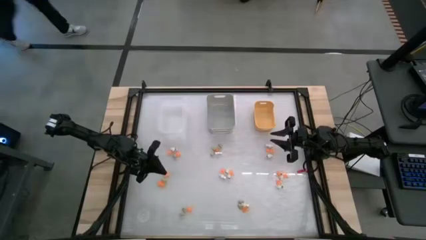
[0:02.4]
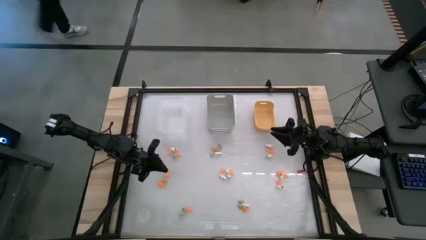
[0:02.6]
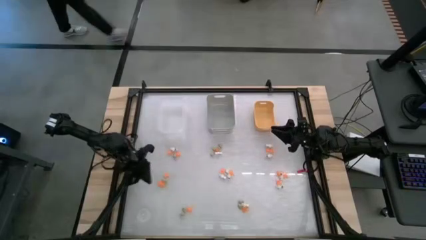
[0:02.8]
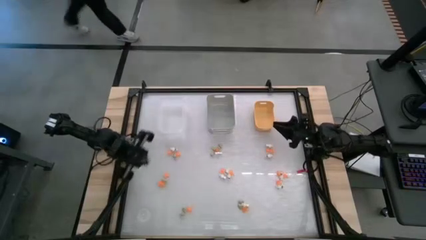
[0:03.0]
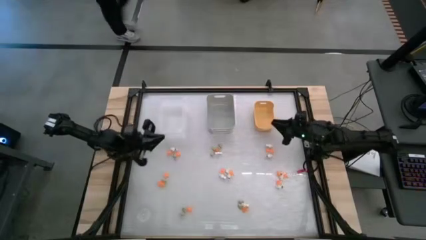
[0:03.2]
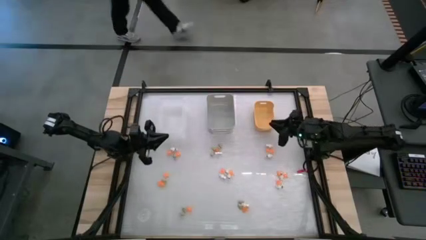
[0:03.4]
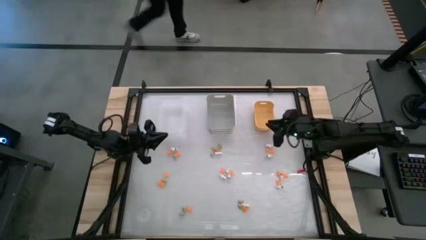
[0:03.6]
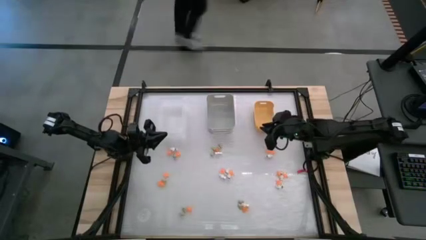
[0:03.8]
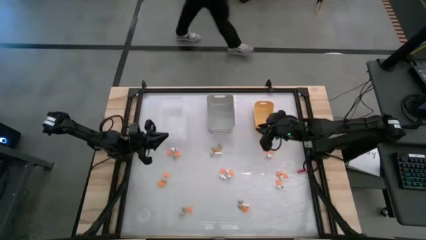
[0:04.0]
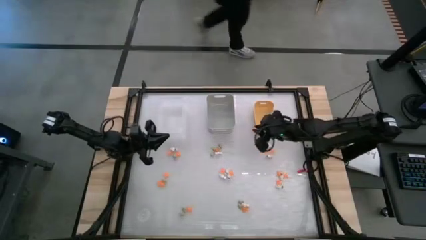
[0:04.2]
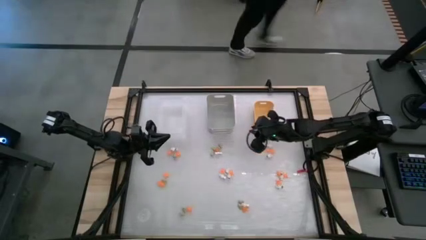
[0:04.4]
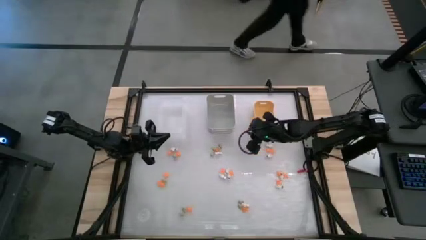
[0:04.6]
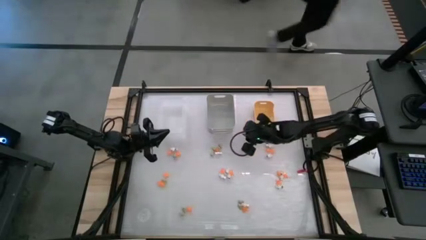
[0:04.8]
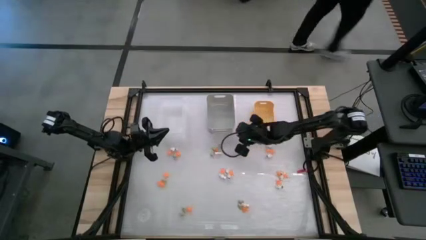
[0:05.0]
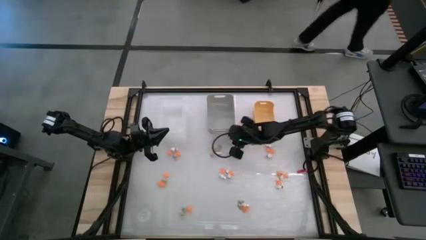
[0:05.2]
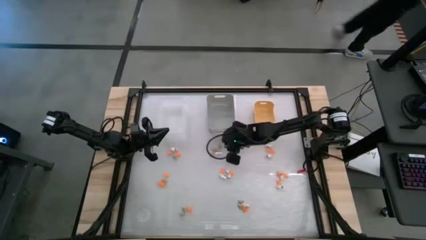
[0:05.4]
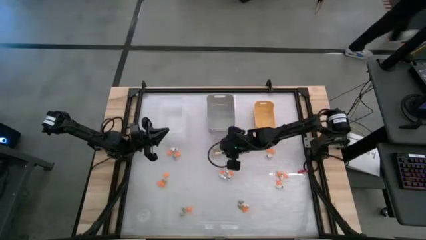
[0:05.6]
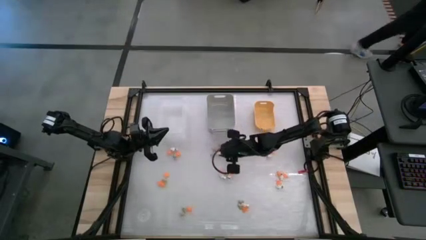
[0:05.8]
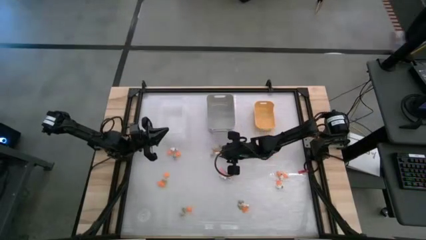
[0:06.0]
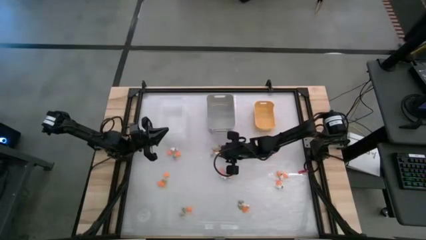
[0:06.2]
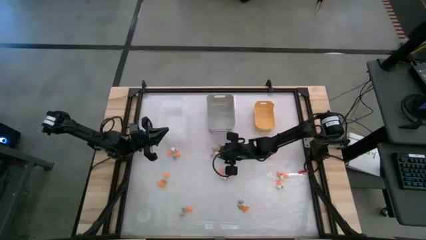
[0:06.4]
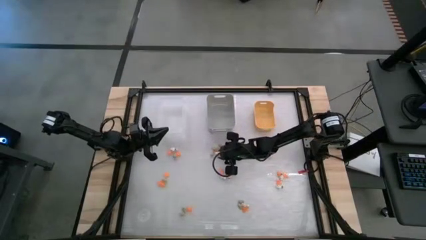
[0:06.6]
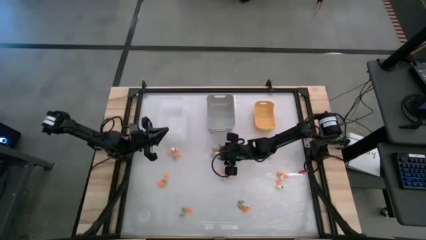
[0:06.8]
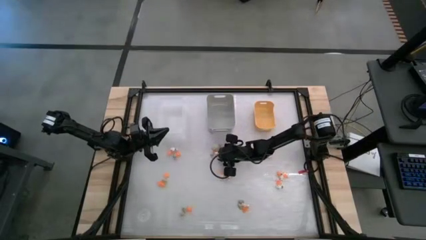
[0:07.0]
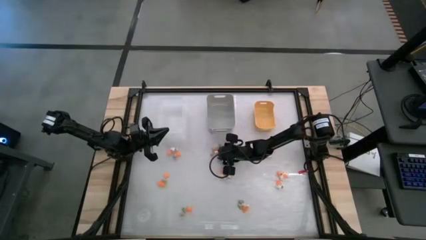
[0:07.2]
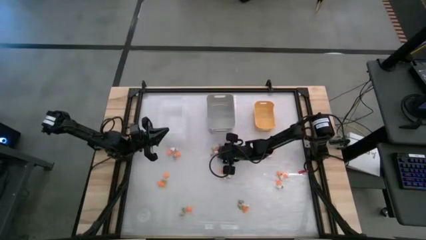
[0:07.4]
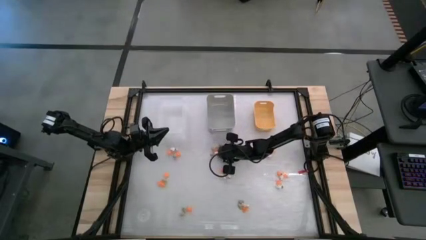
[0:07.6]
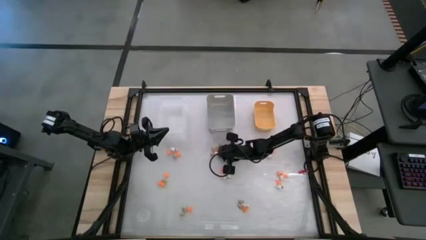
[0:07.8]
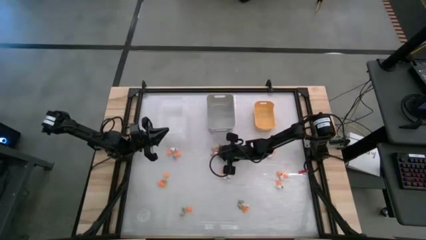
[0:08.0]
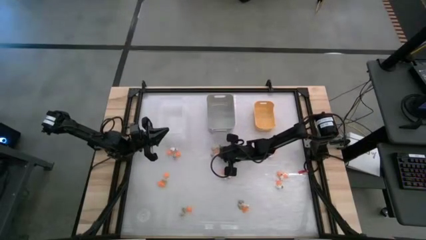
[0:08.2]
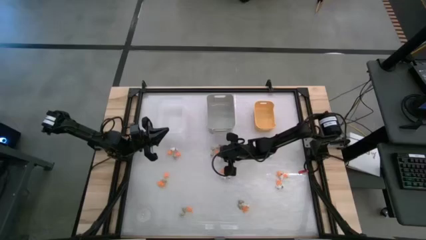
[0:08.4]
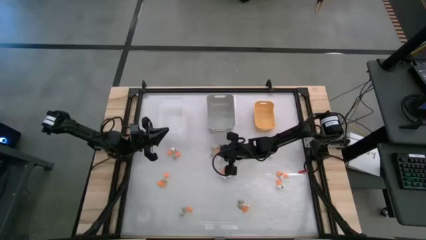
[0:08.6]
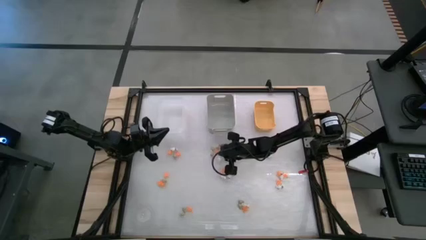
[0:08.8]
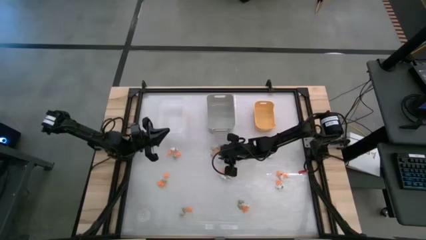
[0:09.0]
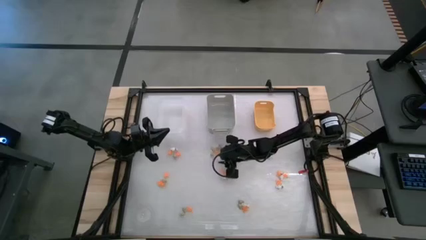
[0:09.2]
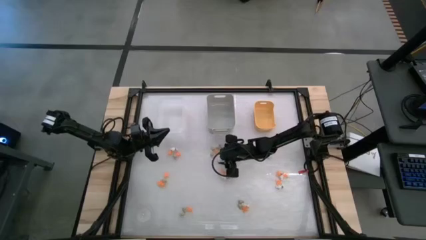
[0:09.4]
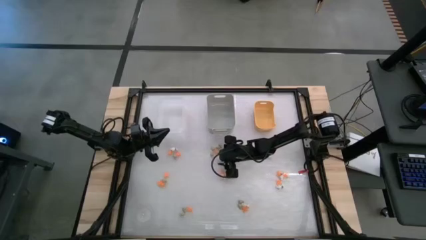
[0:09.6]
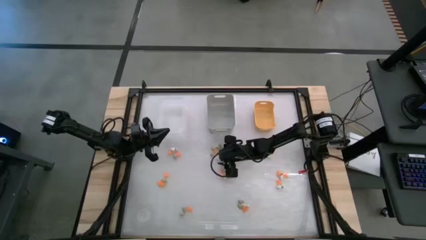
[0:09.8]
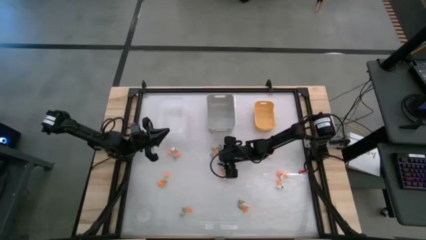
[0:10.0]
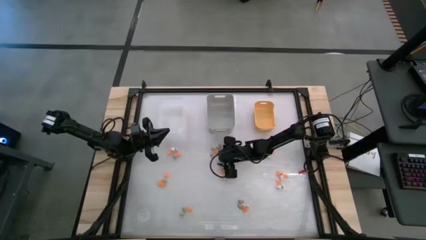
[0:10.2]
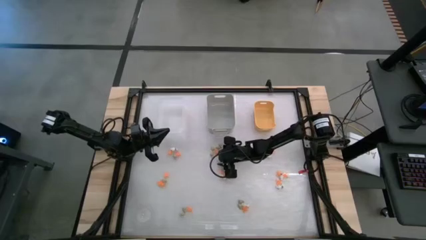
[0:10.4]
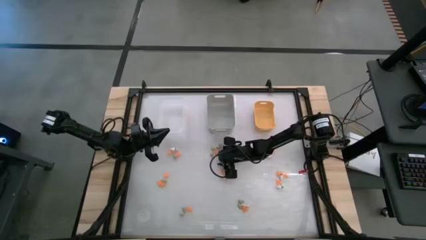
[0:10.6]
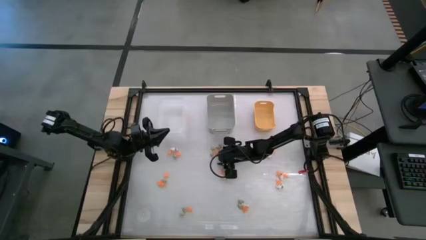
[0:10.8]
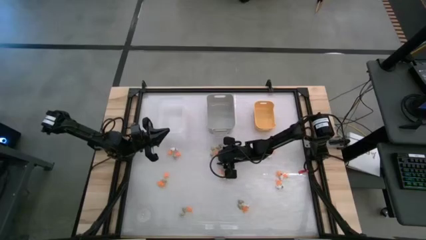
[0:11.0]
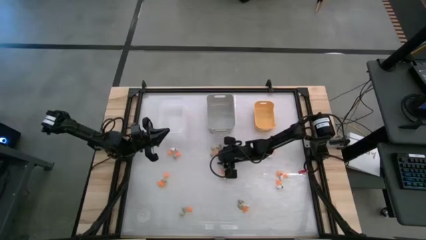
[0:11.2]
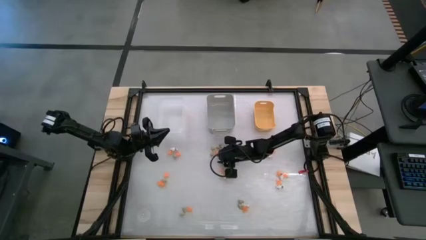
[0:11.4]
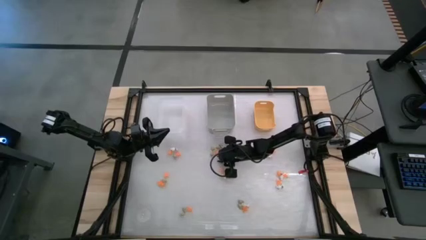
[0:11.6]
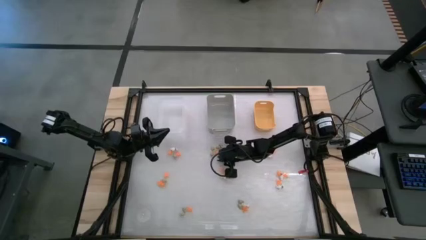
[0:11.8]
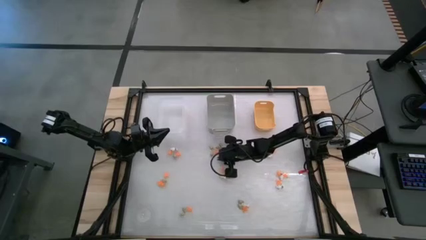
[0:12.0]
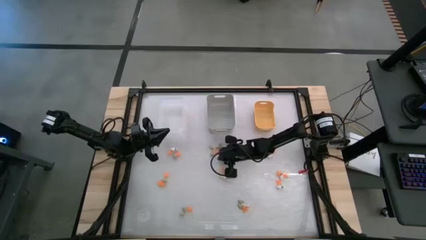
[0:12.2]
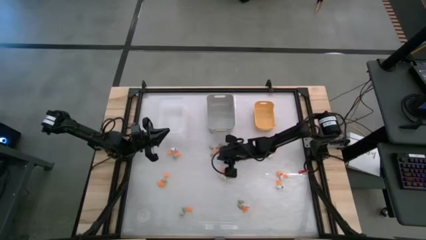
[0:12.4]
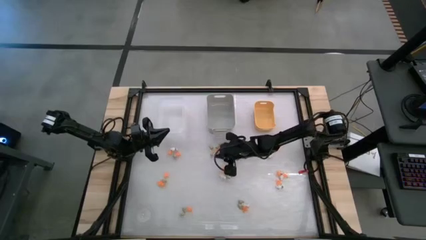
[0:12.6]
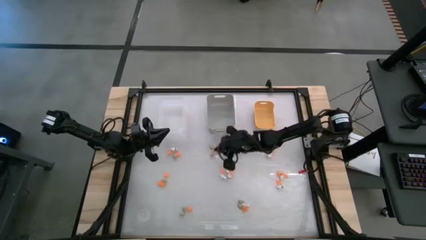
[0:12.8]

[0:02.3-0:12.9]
Task: Sort Halloween decoration
Put the white skeleton toy into the gray bin

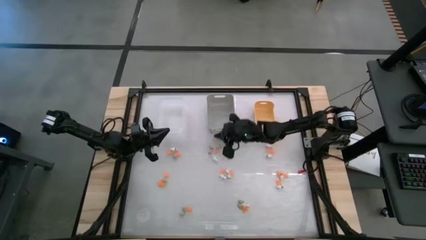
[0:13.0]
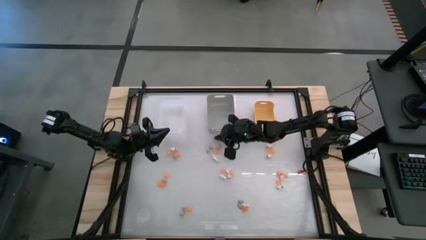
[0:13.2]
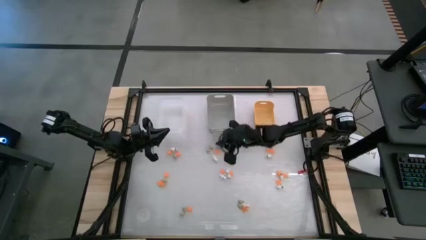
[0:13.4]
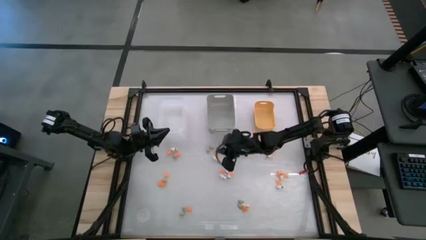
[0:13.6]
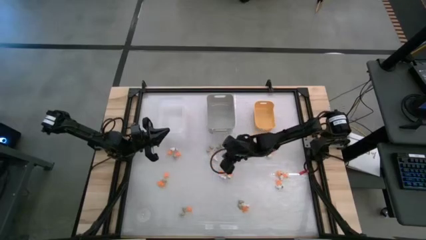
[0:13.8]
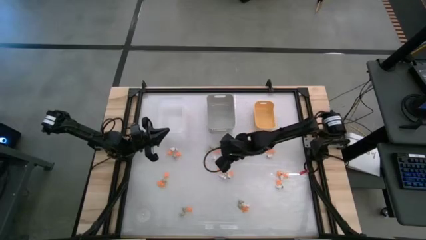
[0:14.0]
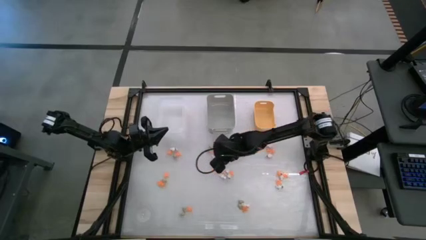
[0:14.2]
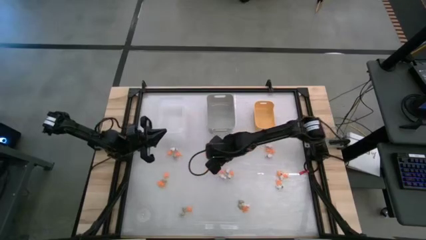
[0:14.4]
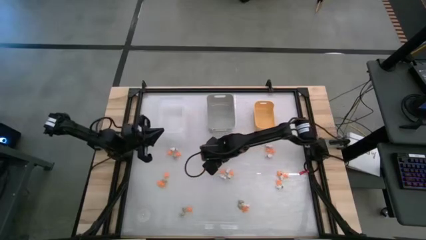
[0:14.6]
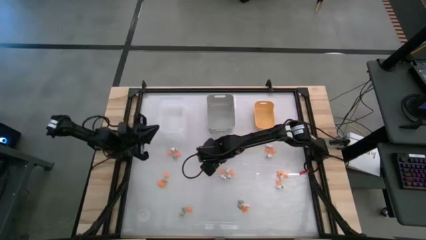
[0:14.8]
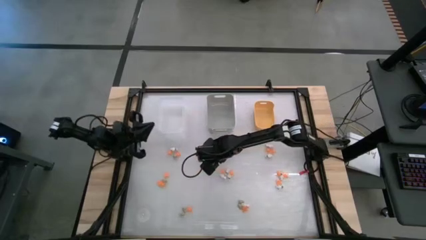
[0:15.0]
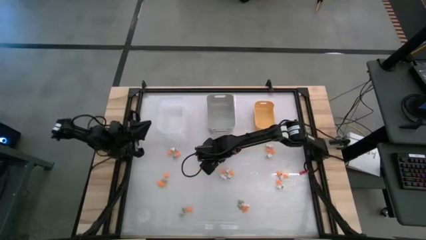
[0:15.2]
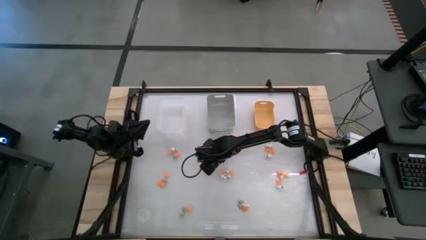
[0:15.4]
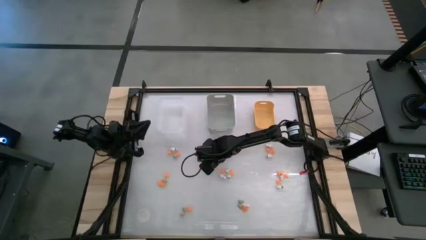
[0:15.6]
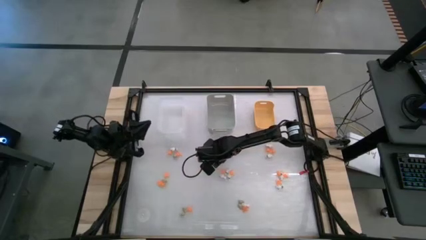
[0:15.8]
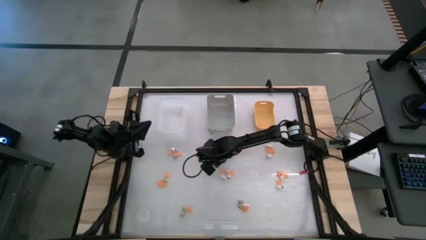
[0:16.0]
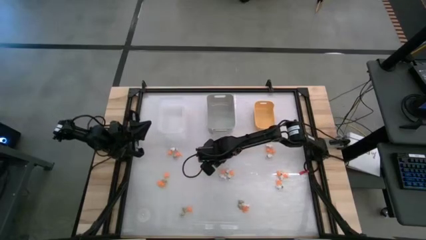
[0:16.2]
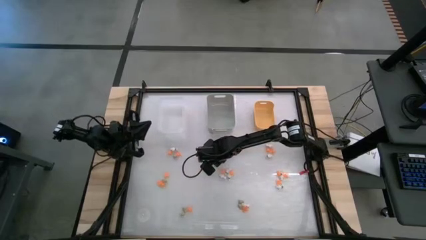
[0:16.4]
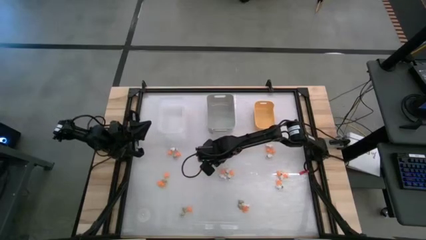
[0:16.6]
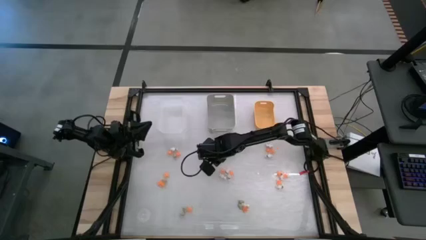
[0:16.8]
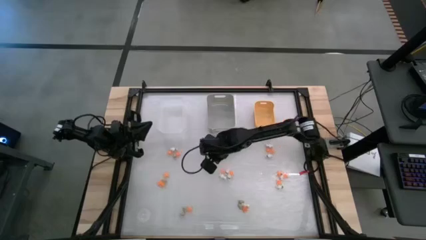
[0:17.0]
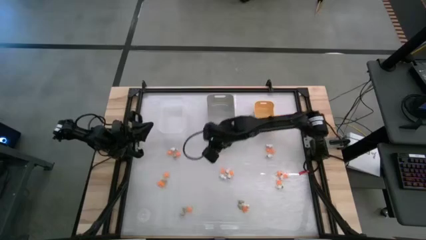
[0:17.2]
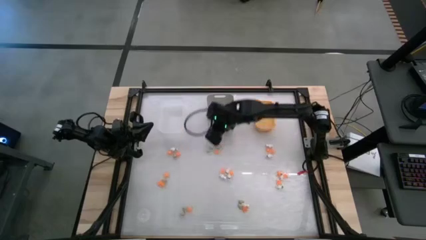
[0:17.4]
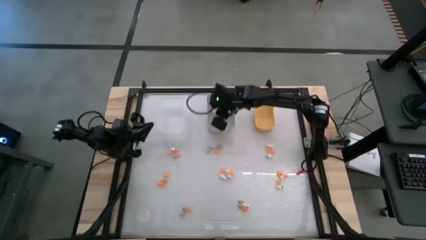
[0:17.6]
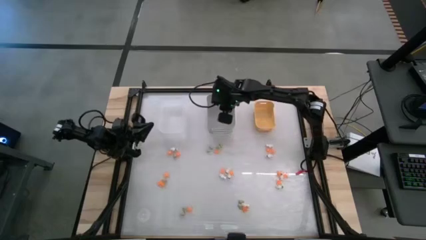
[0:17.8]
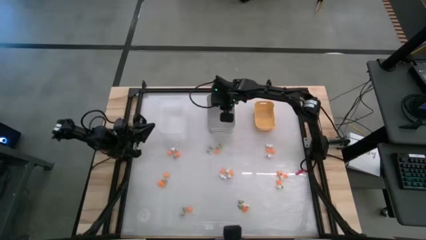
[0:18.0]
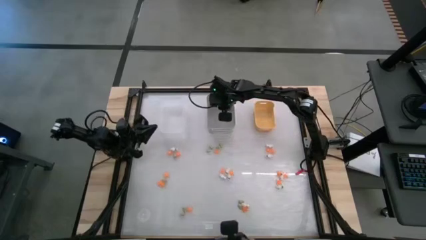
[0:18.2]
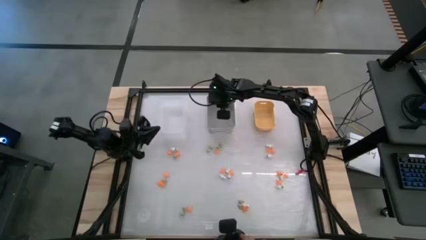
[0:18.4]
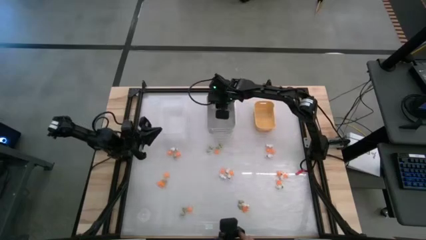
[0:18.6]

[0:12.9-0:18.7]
Put the white skeleton toy into the gray bin
